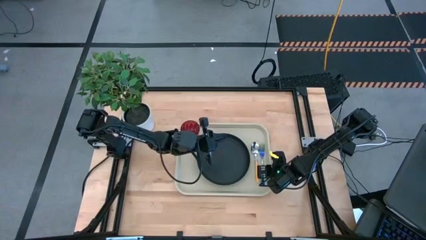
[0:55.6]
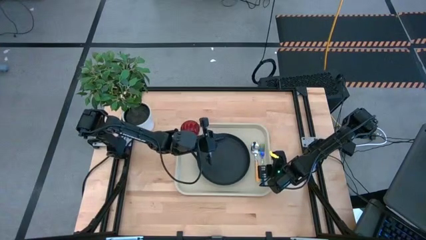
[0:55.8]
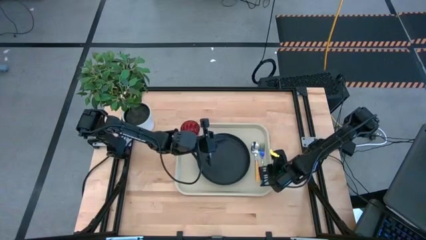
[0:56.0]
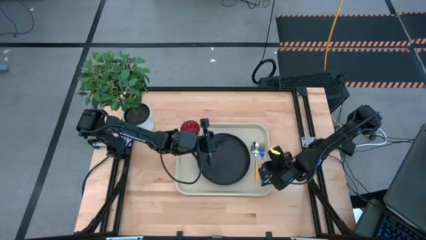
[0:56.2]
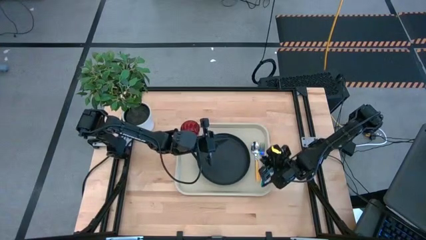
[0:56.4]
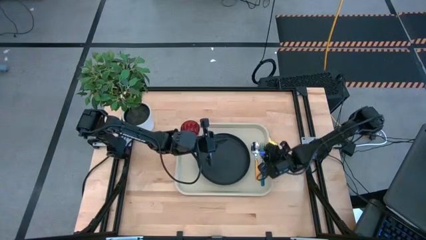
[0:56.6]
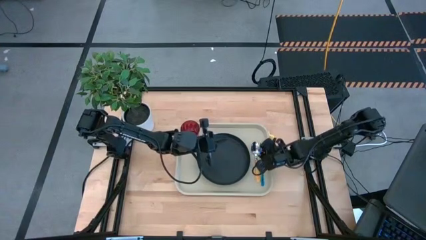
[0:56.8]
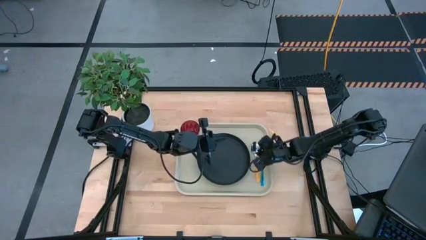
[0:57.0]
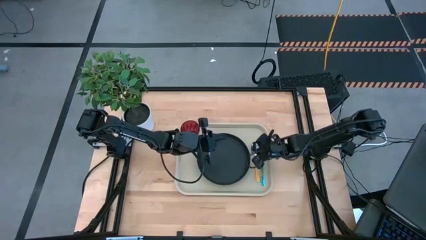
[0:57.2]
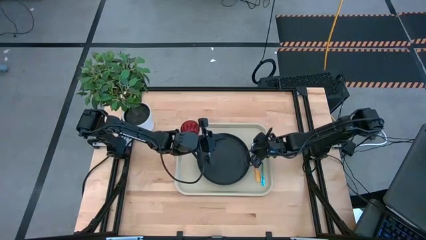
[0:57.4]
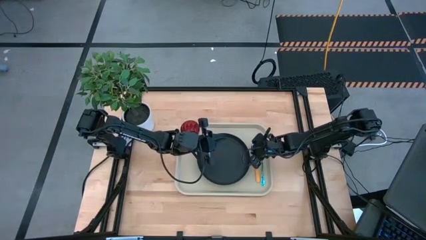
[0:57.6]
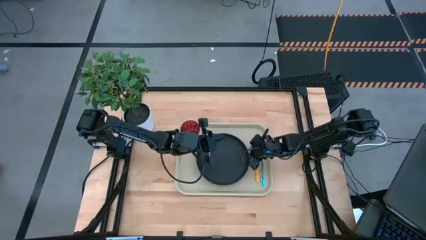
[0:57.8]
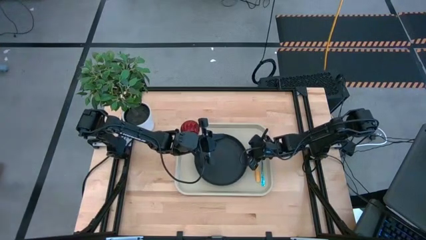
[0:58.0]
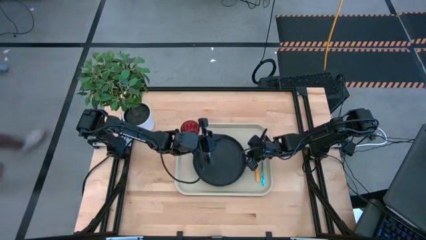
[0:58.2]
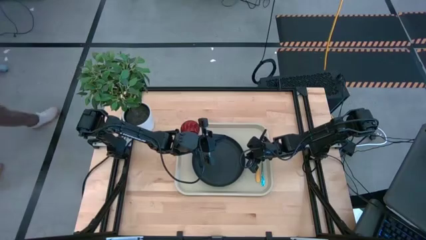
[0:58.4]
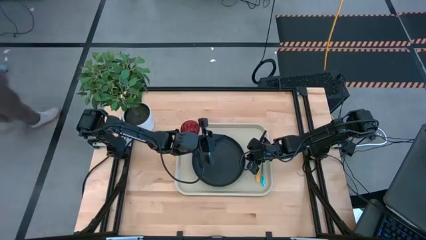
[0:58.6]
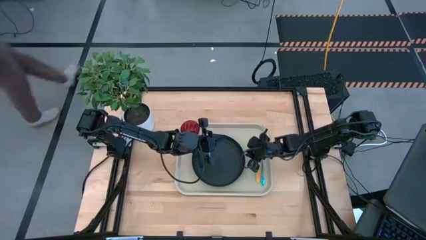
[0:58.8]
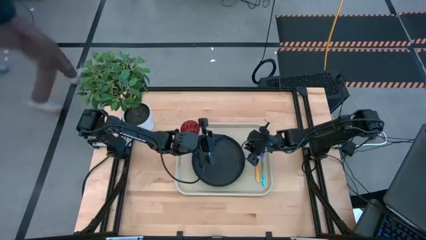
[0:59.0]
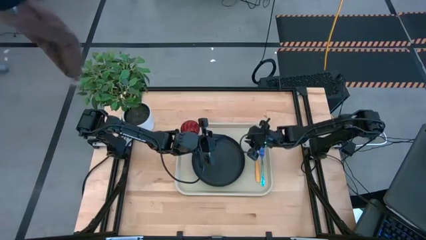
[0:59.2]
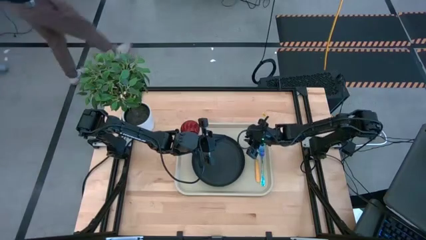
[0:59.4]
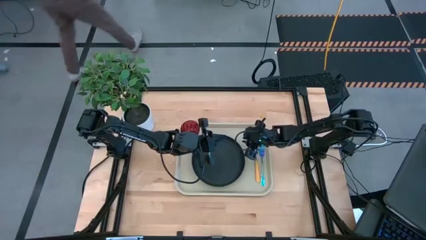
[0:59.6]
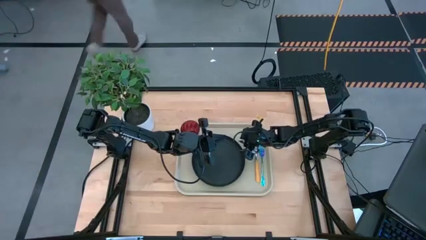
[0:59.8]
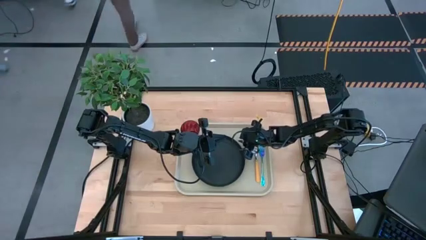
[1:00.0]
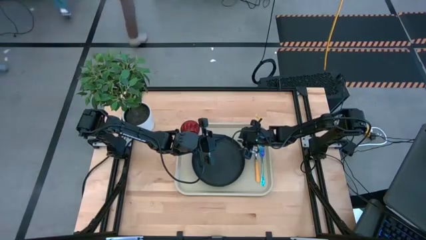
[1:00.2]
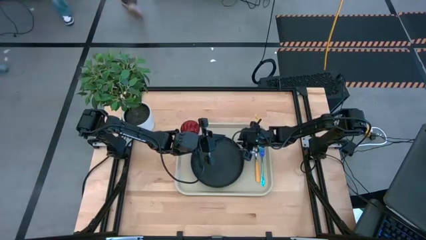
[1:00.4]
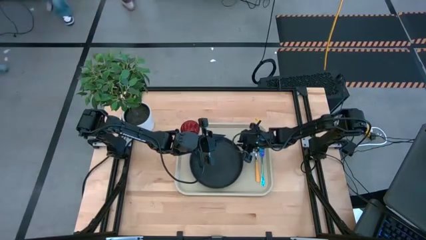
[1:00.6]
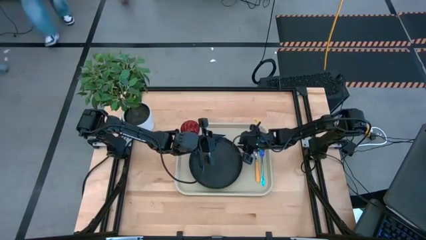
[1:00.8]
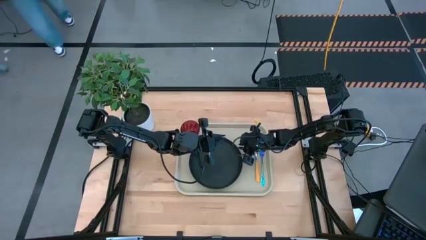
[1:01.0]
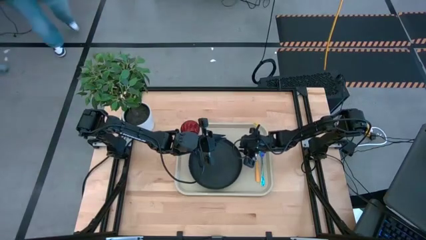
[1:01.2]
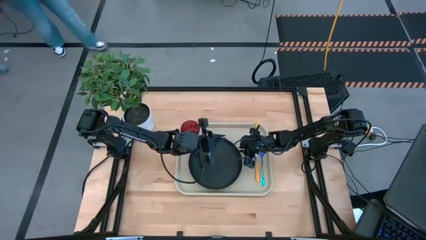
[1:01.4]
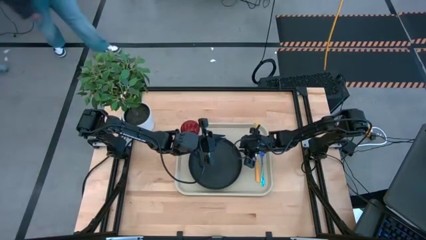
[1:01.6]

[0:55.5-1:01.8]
Task: Pick and place plate/cup/fork/spoon on tray
Adjust the plate on the tray

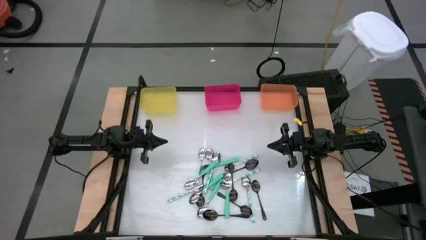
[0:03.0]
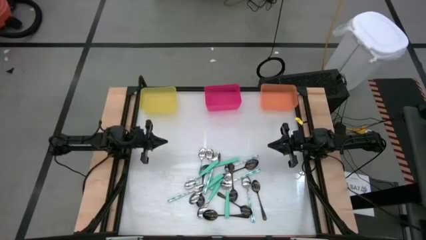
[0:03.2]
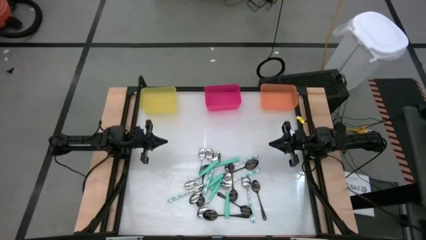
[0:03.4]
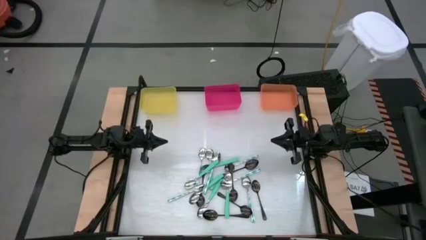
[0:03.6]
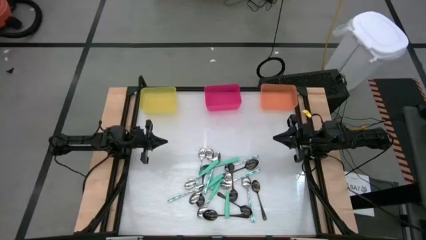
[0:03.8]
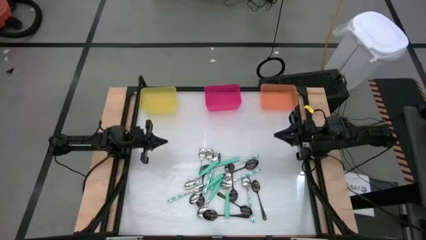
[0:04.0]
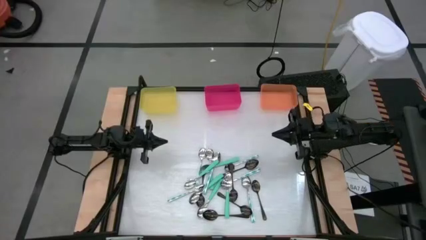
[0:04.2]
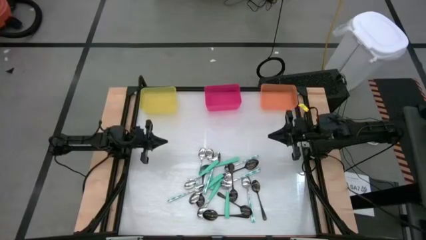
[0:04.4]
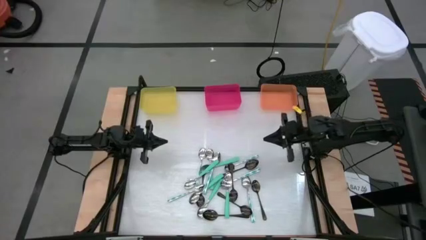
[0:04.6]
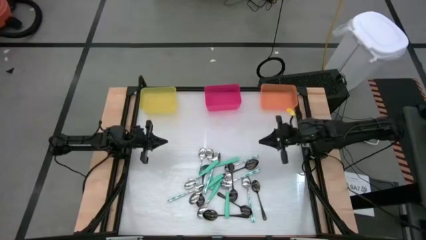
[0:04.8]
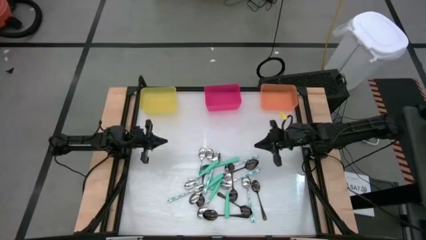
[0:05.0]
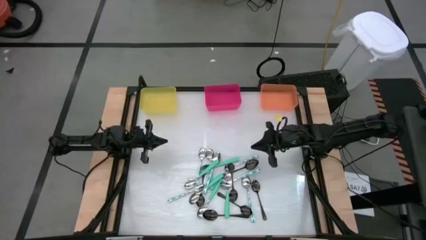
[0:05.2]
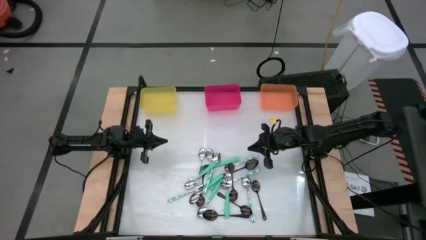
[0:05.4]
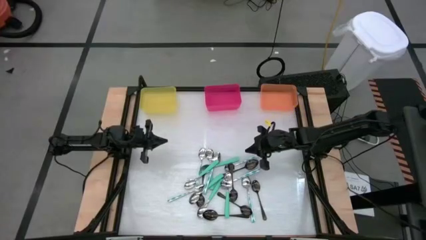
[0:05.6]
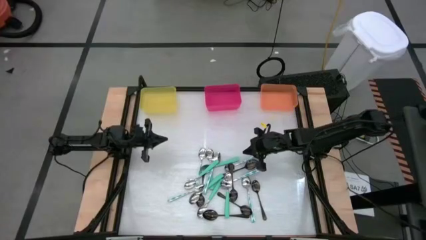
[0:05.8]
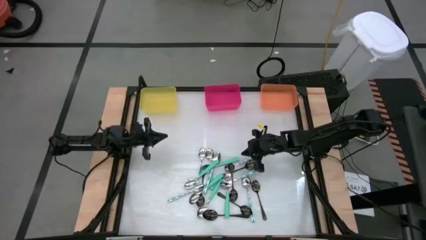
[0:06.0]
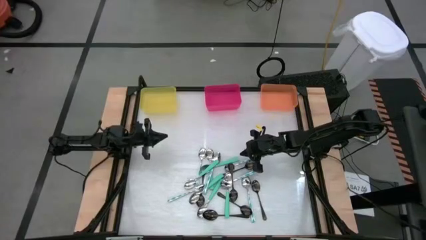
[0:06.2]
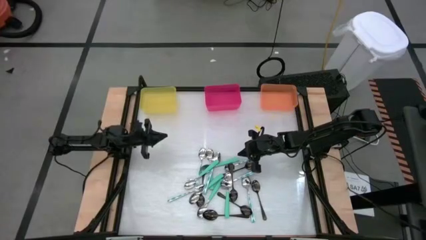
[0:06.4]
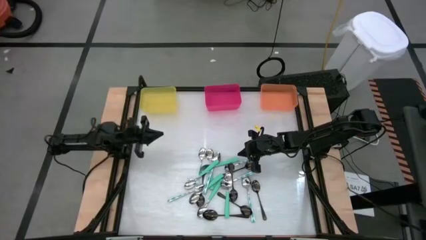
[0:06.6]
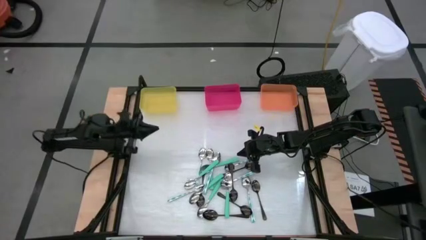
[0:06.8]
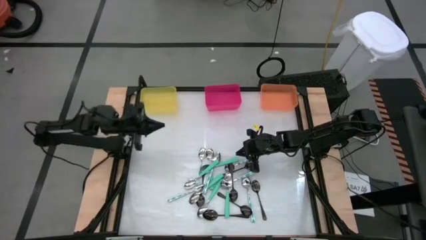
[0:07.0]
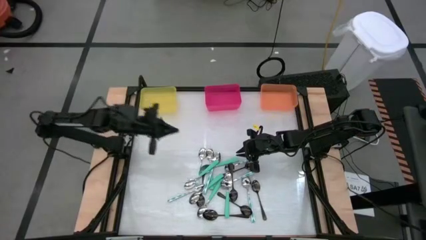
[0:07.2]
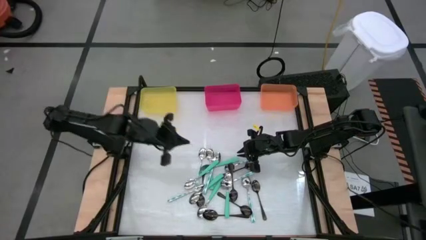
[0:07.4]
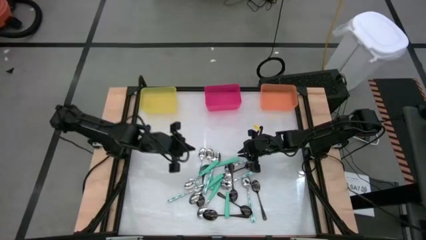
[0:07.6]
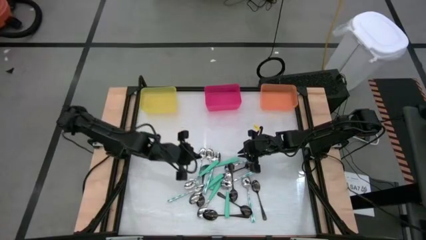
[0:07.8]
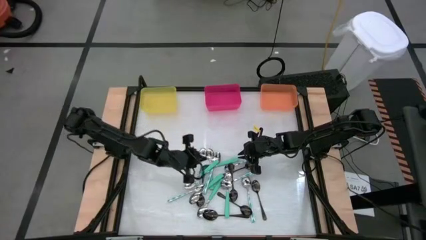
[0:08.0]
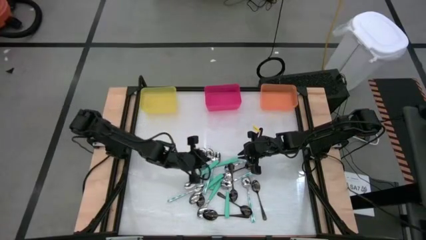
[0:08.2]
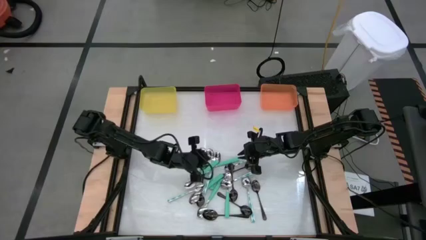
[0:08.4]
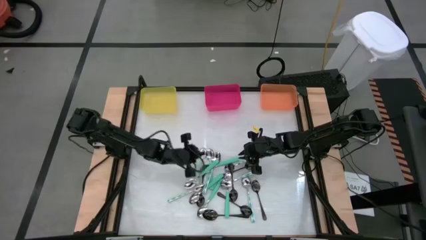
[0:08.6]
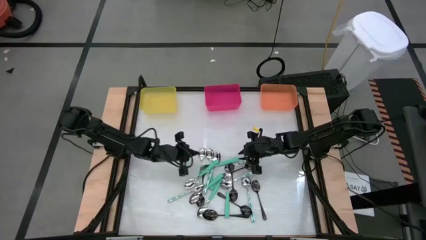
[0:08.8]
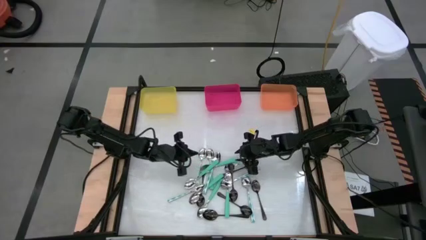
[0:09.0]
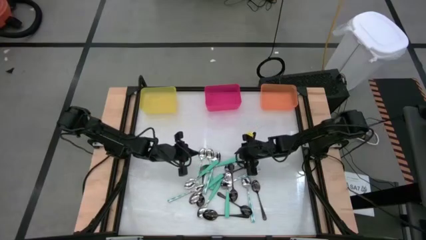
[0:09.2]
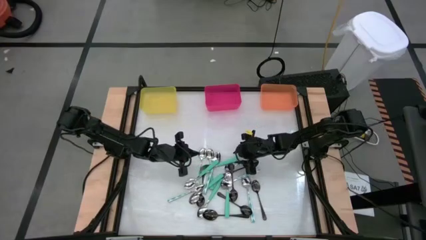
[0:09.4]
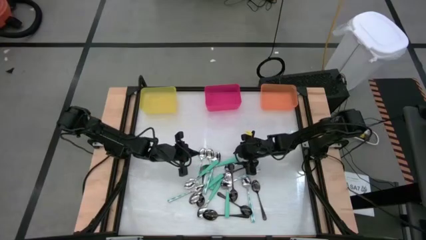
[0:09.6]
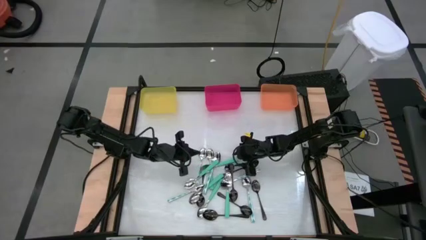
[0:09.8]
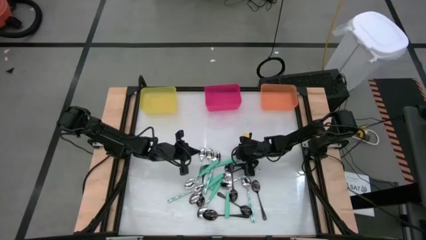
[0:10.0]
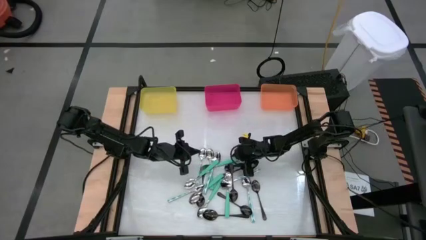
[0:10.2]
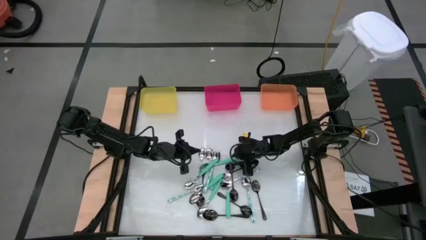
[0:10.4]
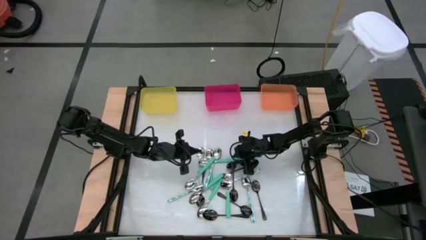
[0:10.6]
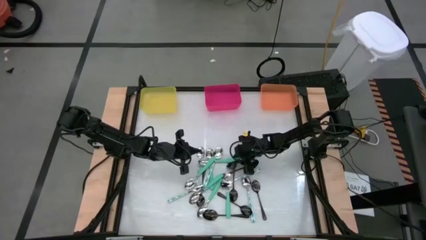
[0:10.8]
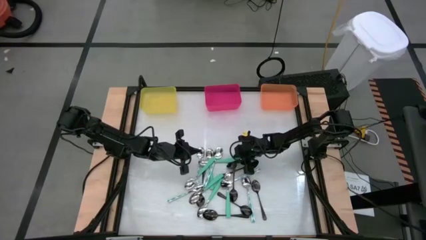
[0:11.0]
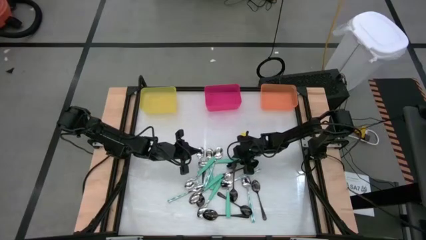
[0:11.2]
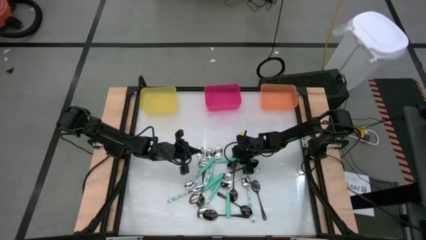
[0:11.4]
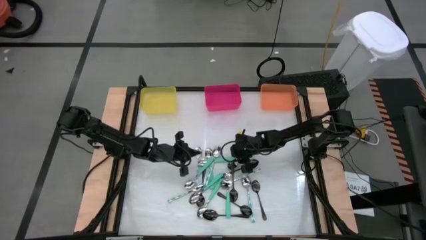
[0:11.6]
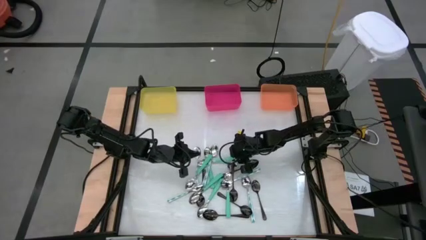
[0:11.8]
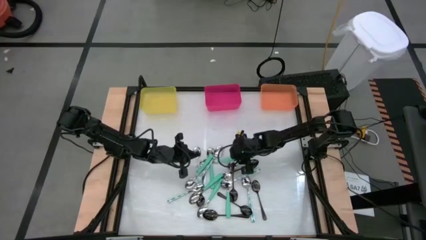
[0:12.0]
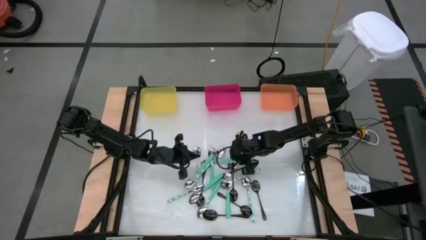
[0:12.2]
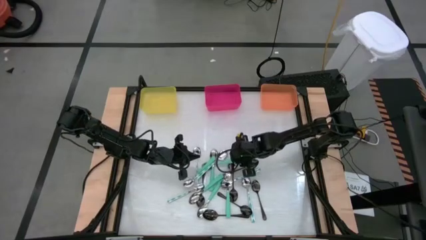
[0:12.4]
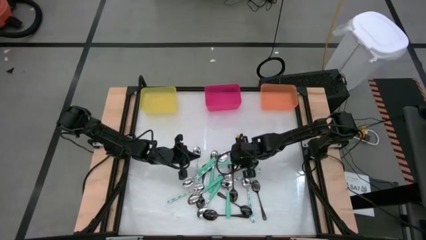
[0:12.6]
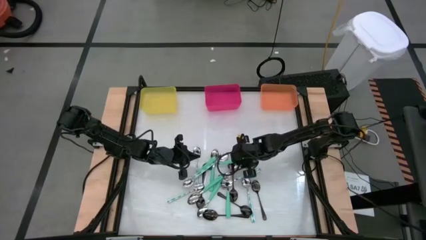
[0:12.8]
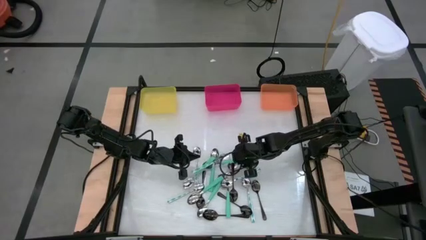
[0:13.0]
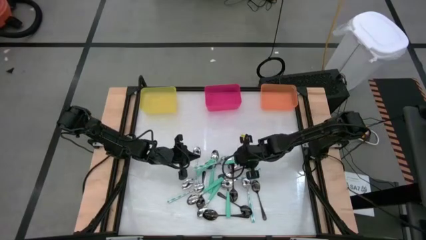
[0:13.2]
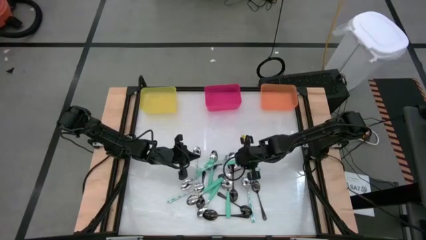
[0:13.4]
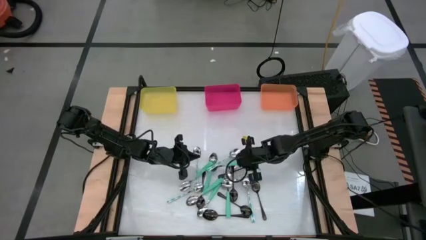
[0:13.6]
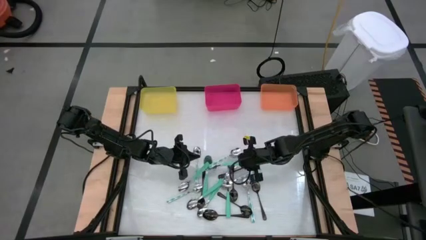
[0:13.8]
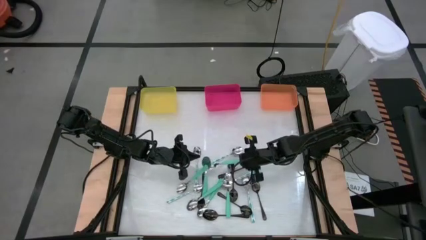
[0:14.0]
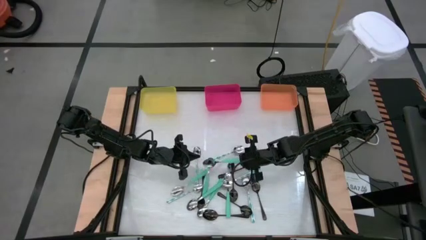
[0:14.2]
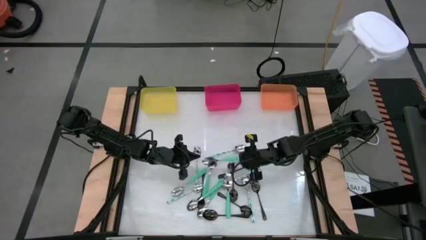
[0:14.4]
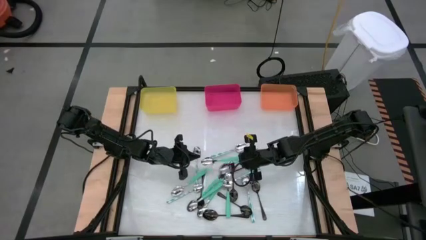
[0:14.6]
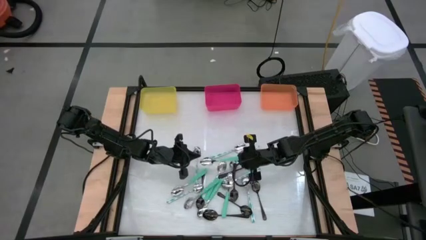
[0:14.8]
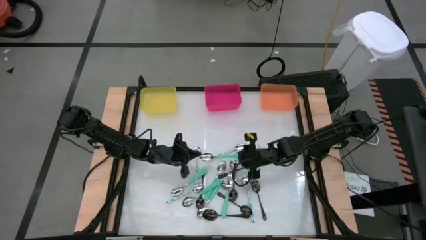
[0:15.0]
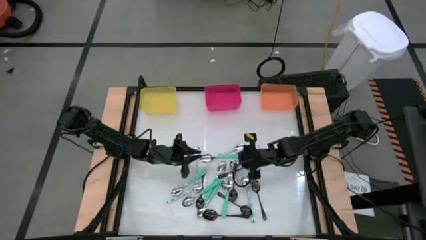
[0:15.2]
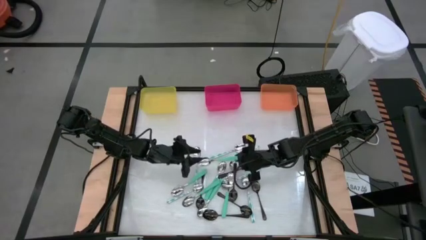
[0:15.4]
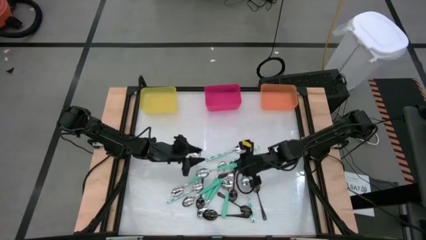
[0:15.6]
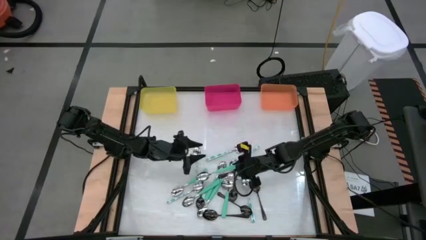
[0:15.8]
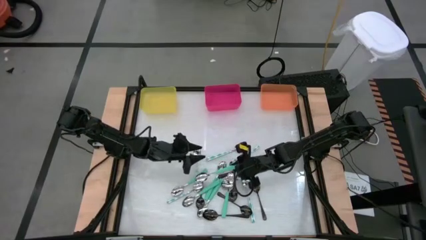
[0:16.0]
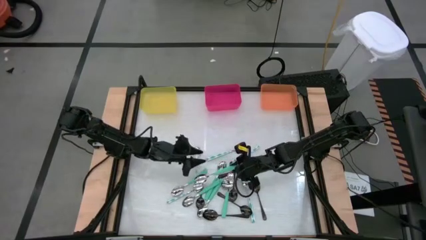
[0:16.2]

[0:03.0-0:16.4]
Task: Sort silverware by color (type)
Put the light green spoon into the yellow bin
